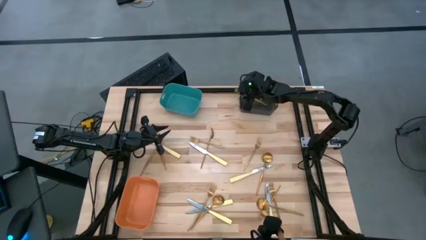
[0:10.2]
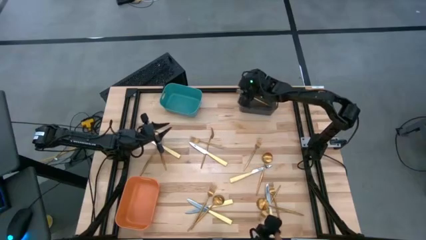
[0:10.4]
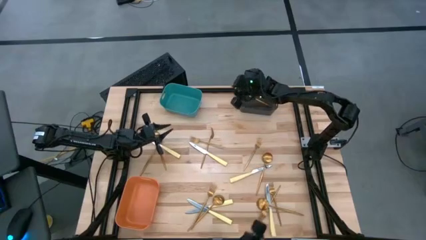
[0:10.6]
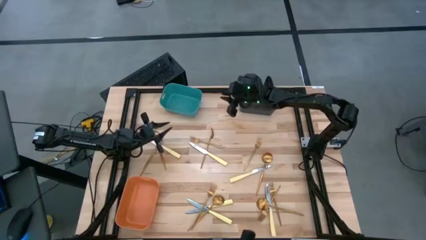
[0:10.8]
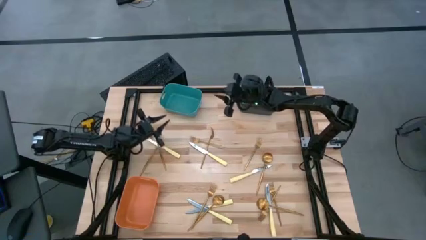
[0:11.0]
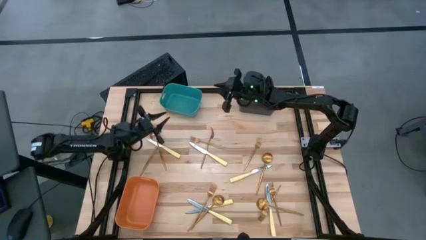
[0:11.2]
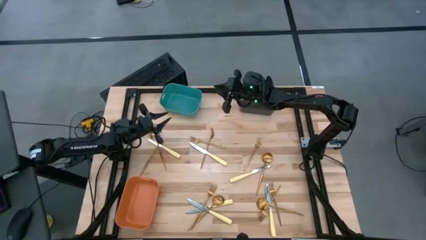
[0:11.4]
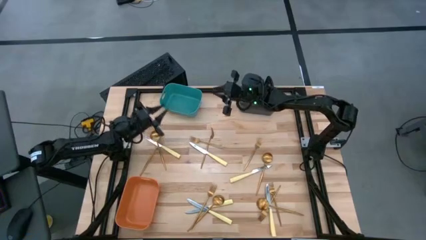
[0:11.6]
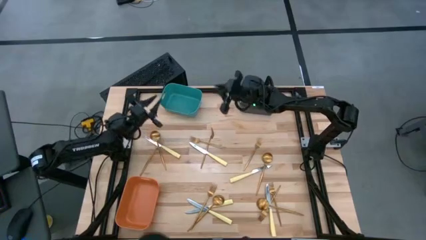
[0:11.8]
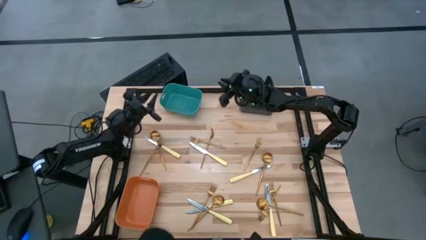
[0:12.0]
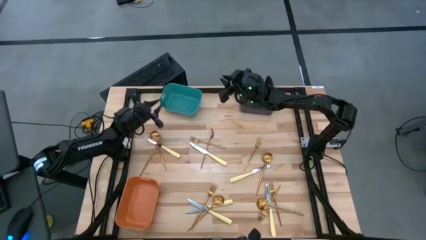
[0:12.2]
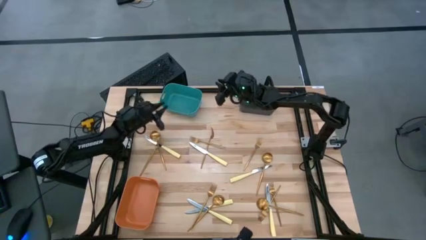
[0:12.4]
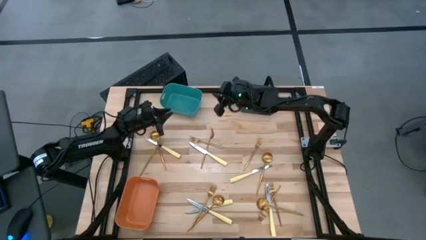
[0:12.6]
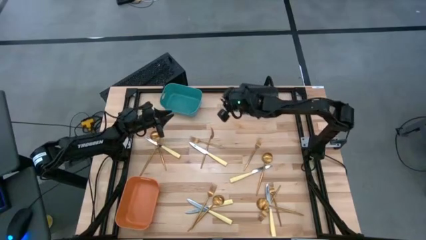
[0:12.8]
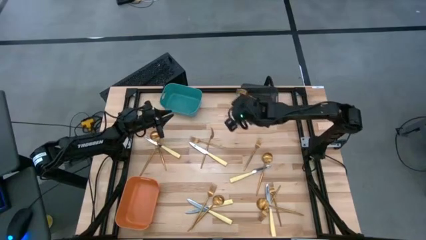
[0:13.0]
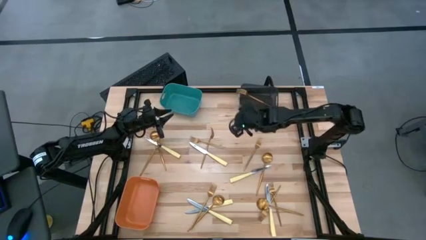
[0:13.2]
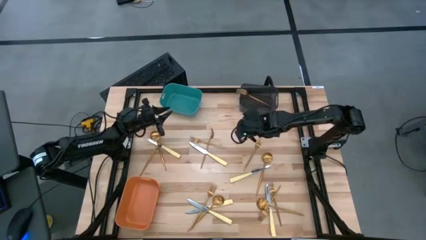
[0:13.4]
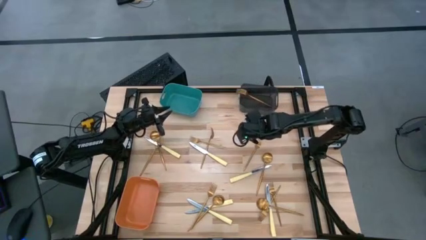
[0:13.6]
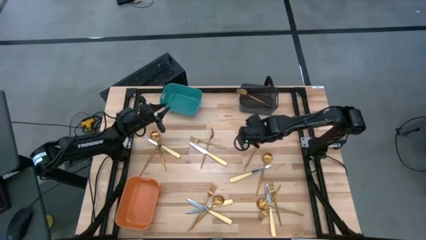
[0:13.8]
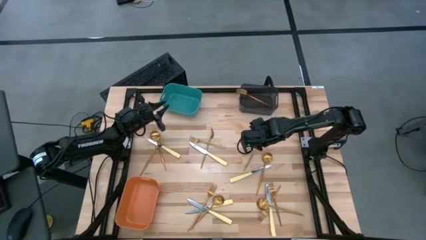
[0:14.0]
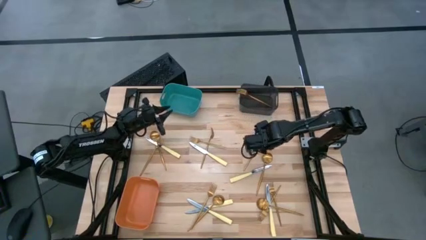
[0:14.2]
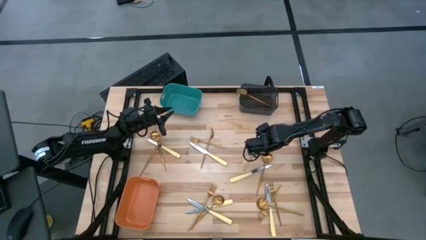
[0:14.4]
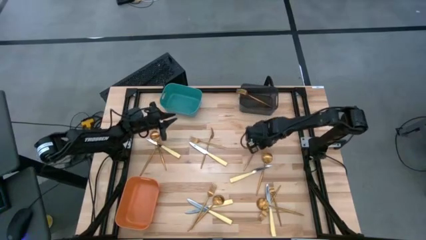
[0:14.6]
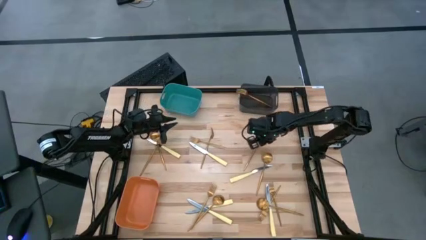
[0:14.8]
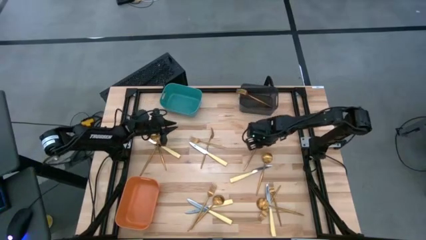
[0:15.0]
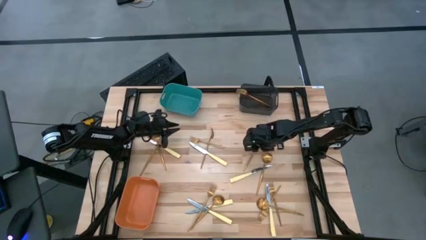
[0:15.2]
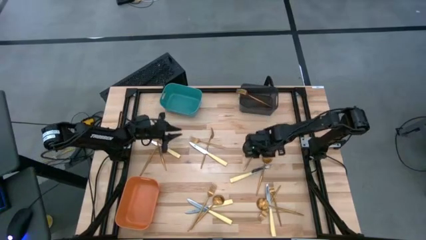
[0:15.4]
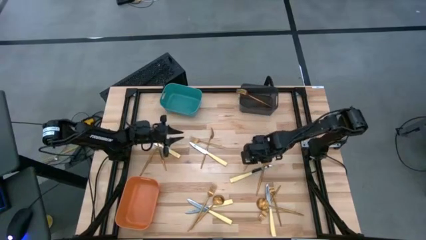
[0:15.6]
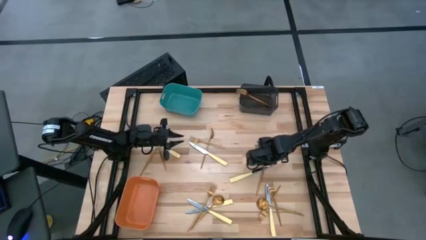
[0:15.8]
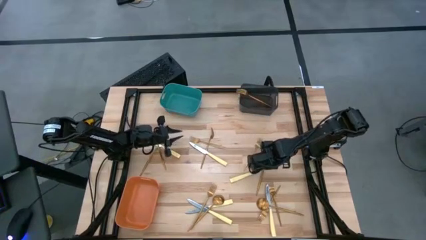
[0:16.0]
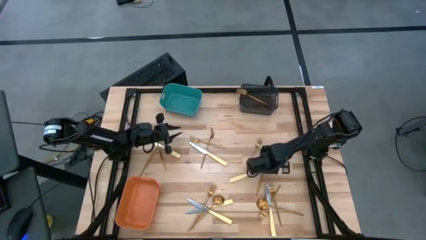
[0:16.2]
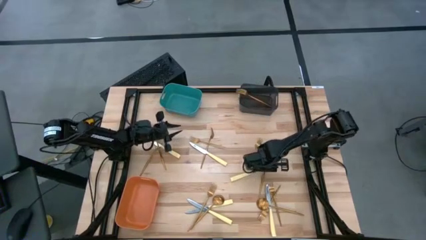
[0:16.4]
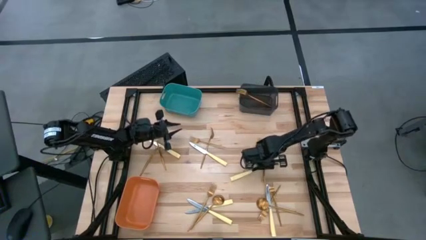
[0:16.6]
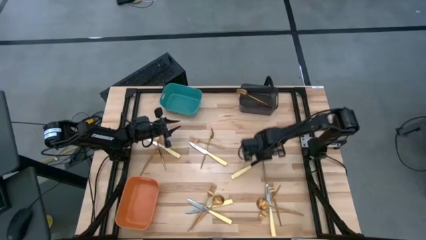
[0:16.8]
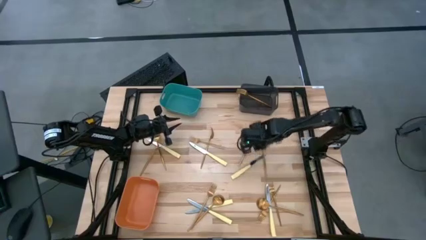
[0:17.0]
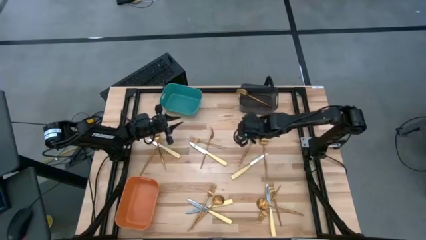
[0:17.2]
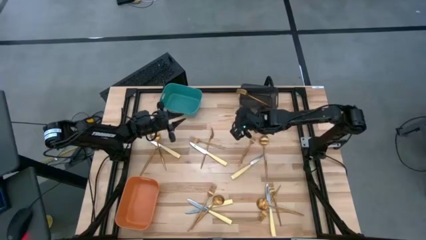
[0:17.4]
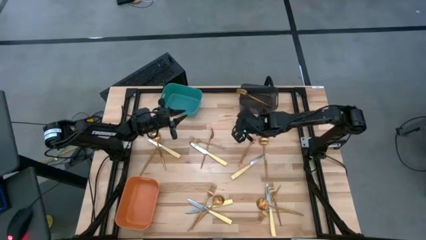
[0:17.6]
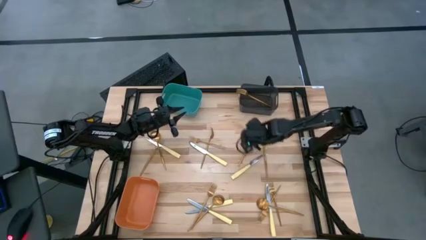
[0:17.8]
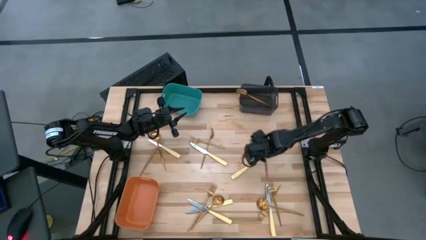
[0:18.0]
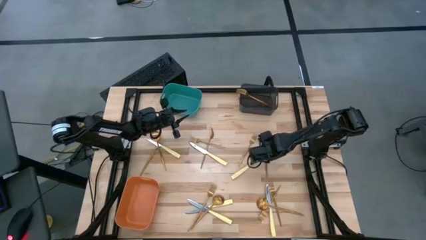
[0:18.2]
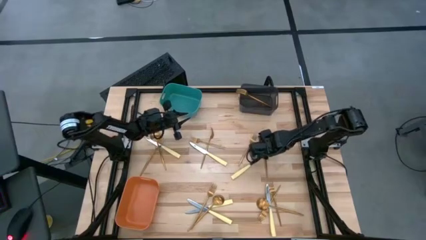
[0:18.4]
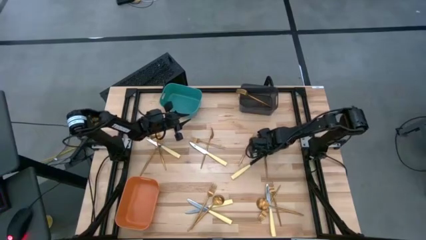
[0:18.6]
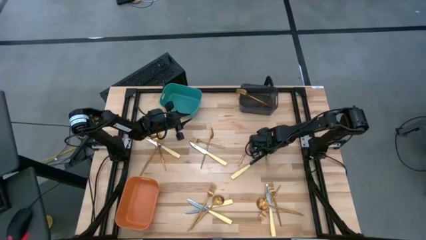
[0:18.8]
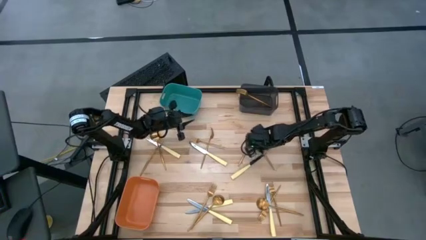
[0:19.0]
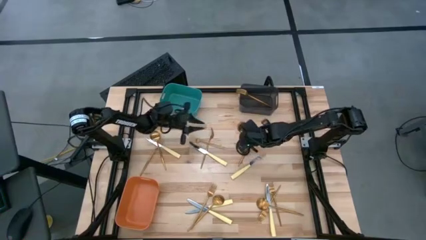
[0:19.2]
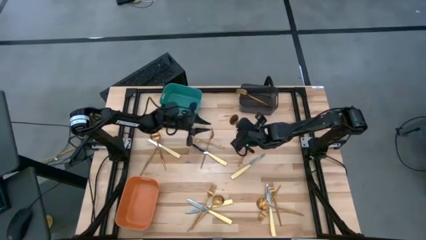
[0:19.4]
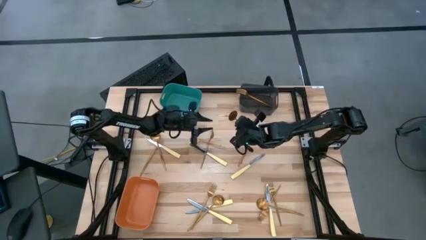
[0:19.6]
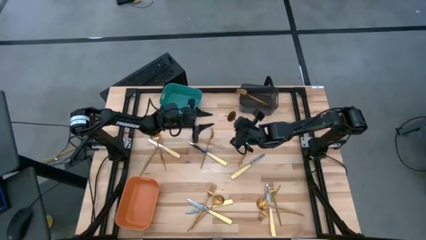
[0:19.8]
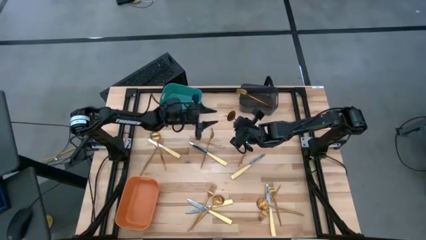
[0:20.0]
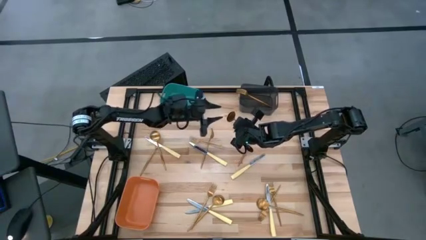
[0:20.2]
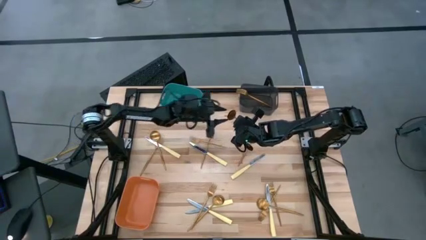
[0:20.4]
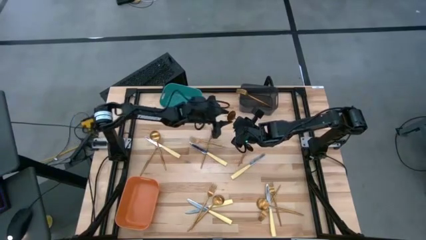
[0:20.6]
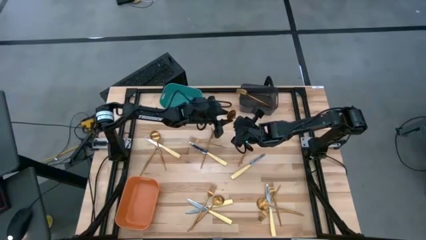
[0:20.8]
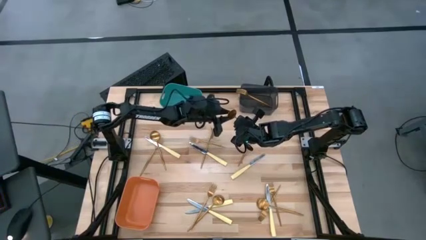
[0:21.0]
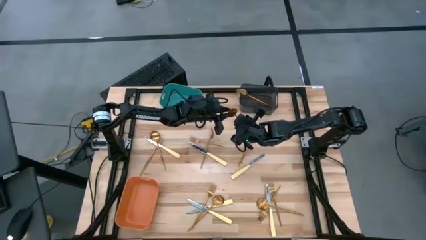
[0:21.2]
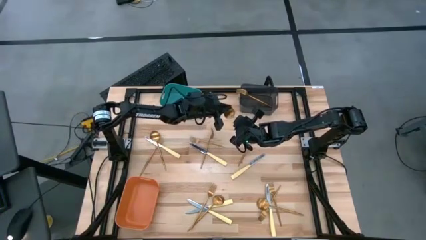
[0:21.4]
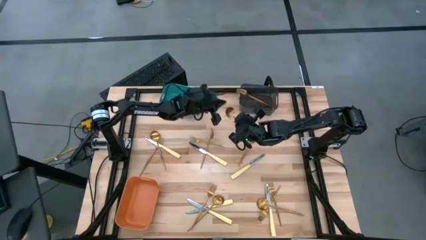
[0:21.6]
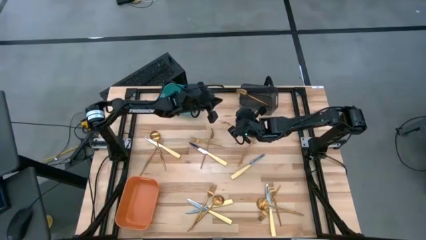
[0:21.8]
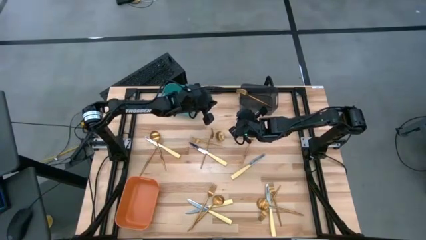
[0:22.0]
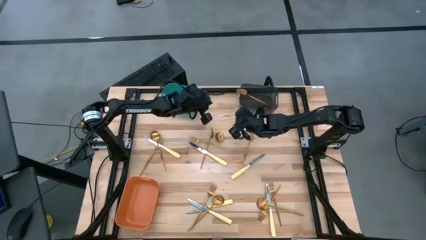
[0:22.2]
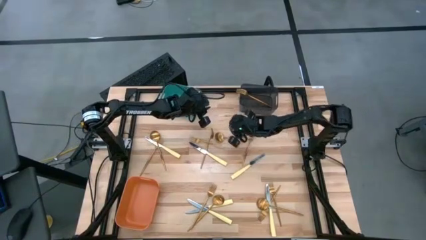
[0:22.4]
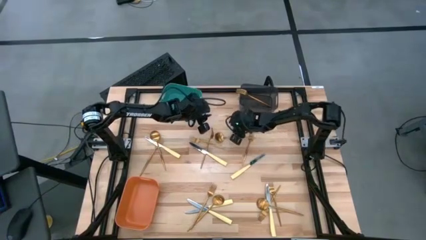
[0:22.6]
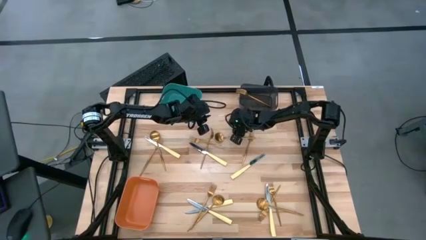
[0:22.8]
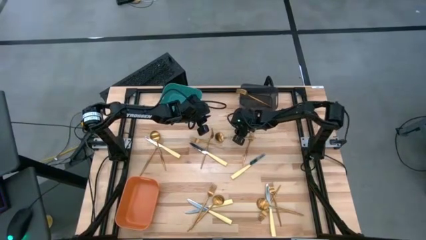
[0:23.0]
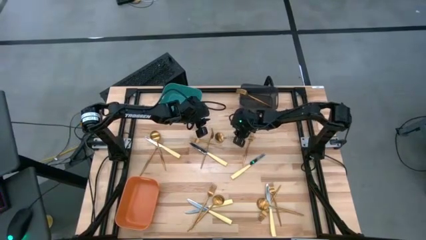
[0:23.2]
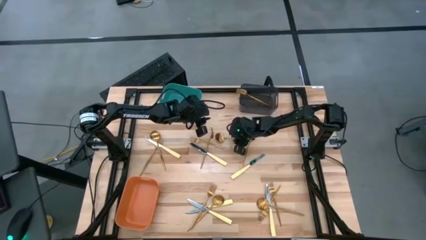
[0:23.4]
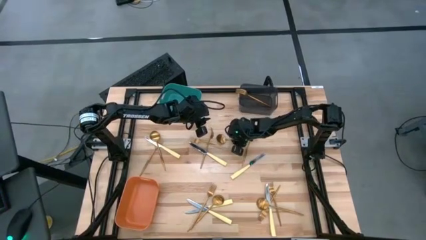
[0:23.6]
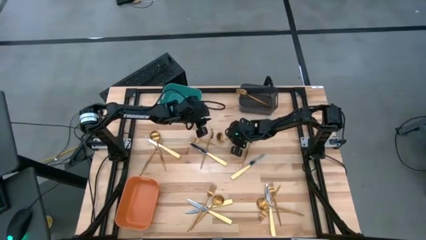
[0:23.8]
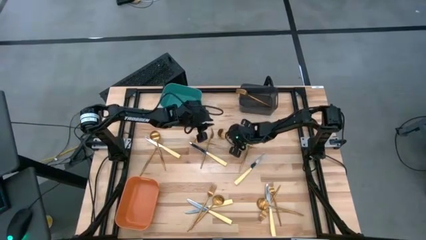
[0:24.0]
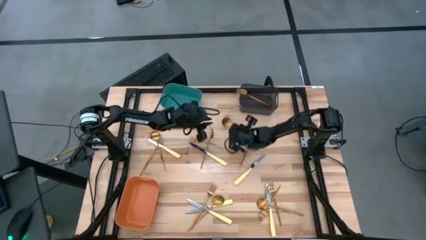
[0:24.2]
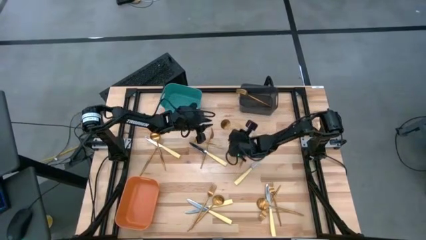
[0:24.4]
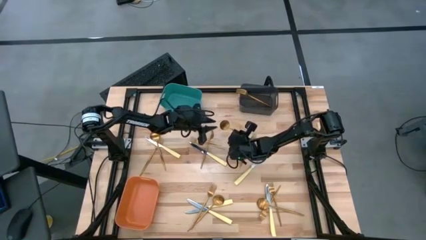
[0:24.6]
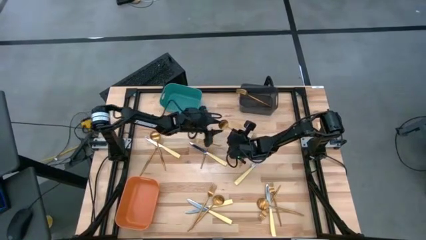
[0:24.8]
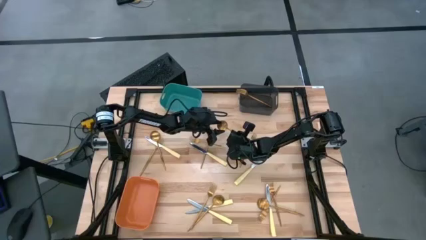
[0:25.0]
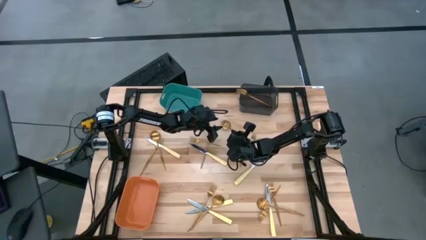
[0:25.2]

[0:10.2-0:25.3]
Task: Sort silverware by color (type)
Put the gold spoon into the green bin
